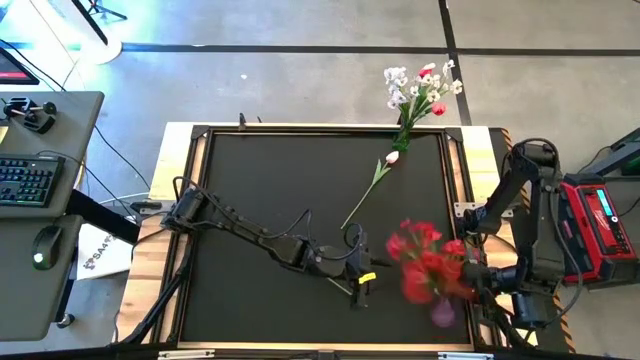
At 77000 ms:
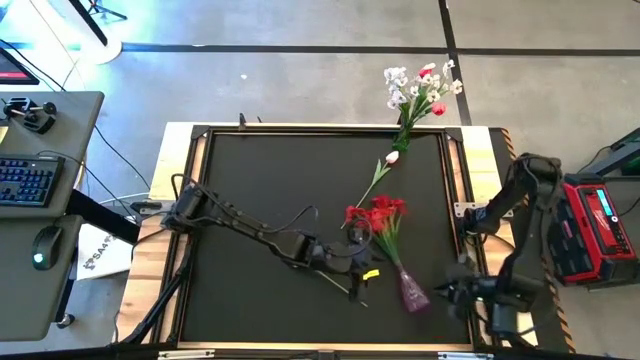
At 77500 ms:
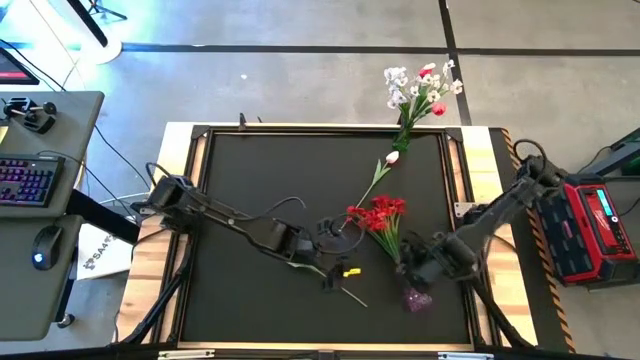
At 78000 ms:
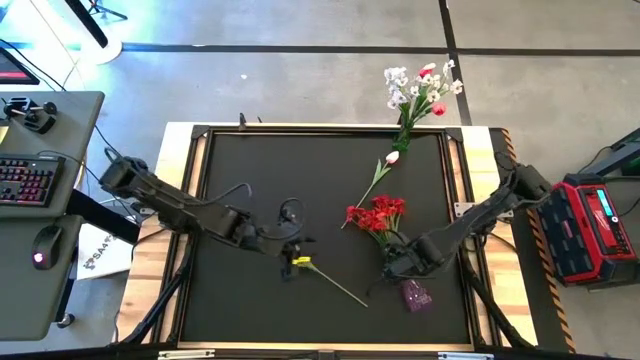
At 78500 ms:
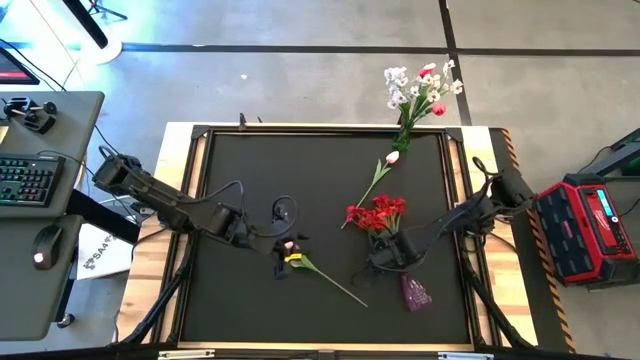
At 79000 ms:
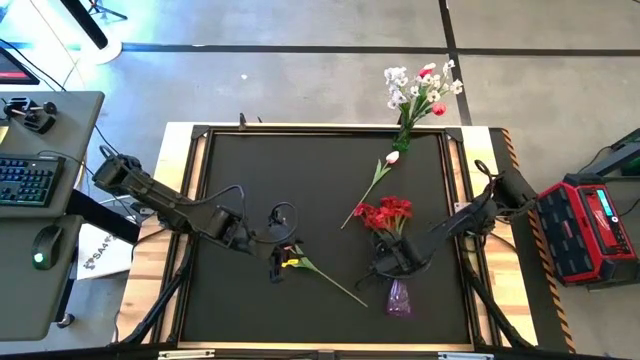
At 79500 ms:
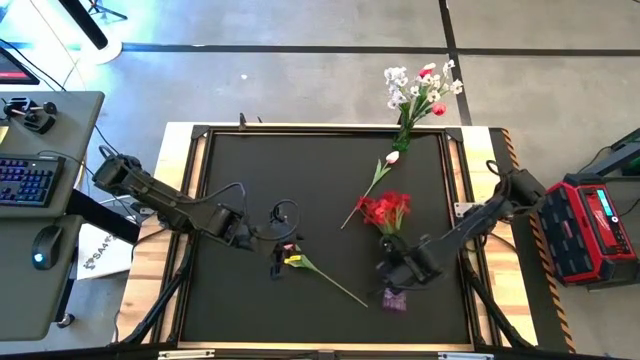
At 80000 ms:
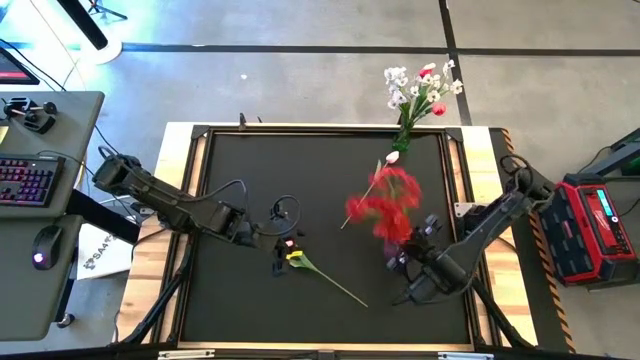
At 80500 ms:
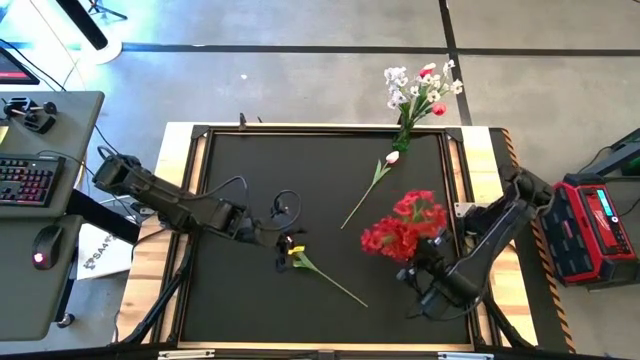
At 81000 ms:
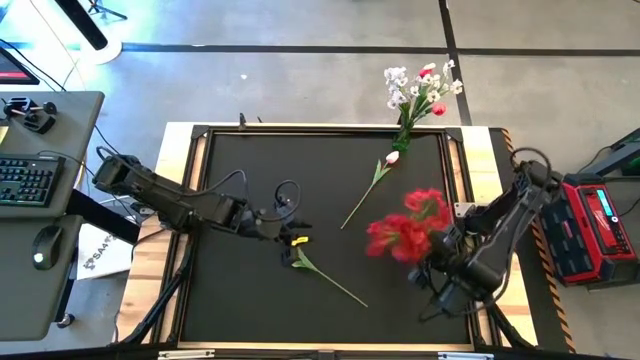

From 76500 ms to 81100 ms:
Task: Sort flowers into vase by color
Adjust the violet vase

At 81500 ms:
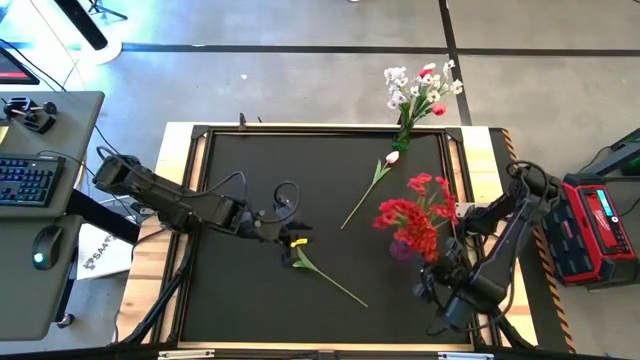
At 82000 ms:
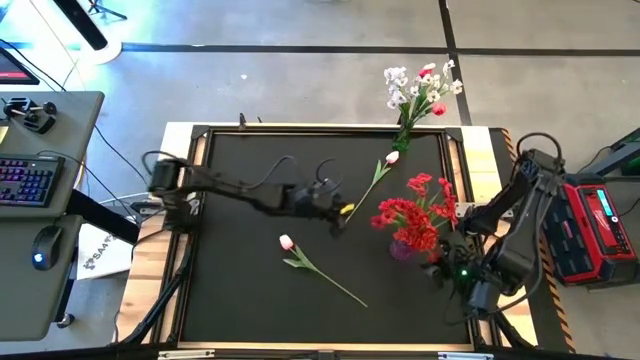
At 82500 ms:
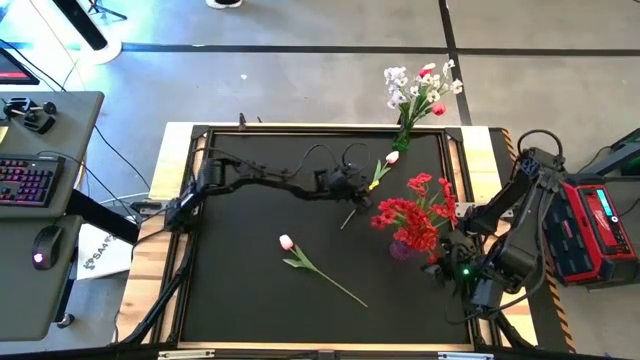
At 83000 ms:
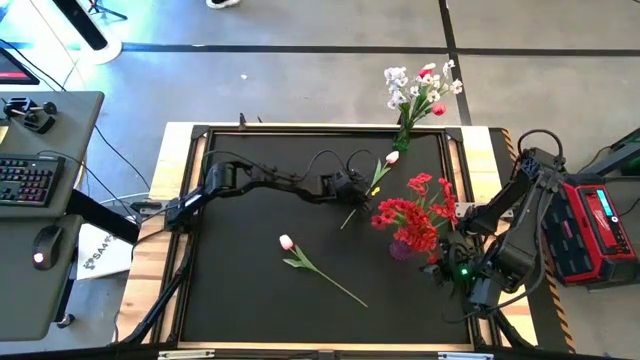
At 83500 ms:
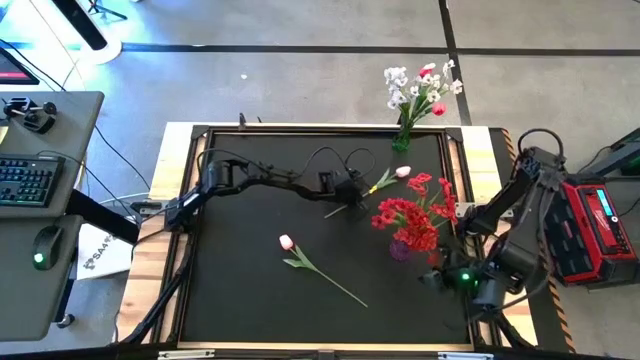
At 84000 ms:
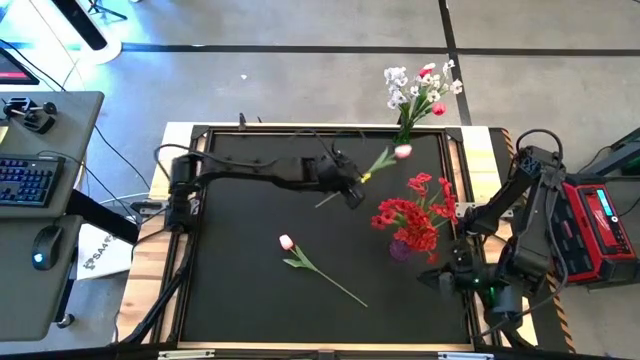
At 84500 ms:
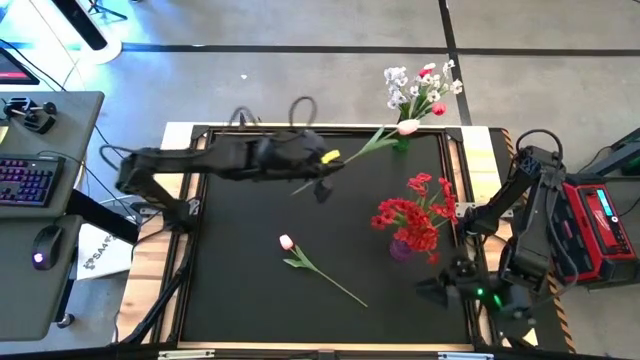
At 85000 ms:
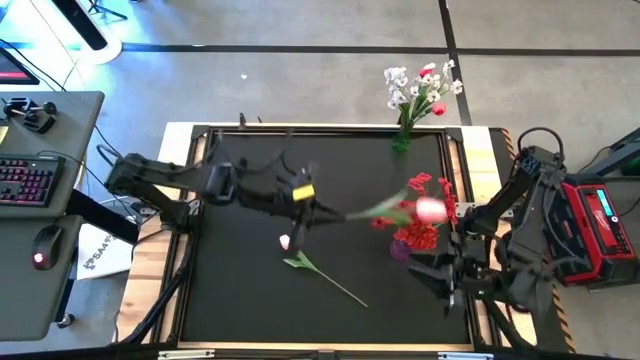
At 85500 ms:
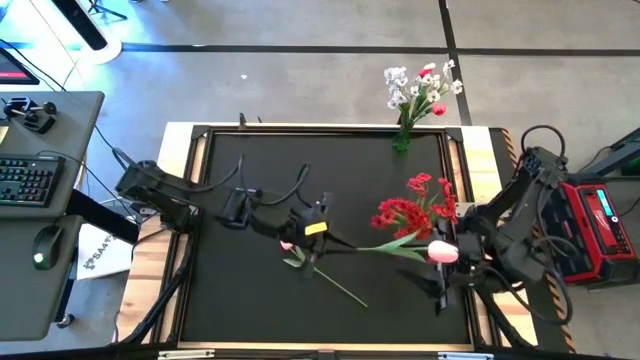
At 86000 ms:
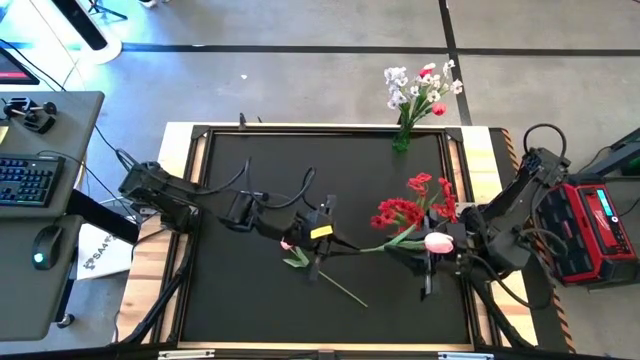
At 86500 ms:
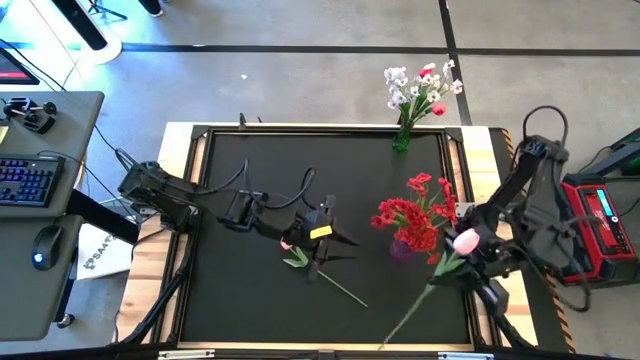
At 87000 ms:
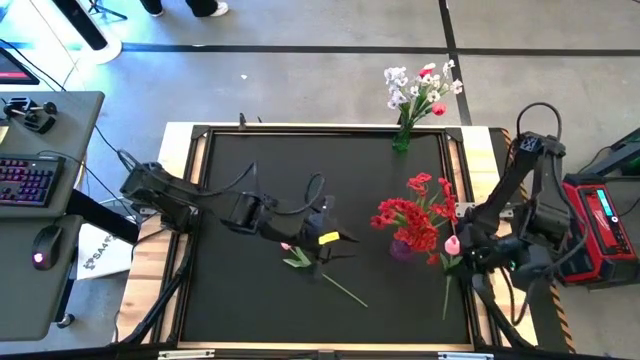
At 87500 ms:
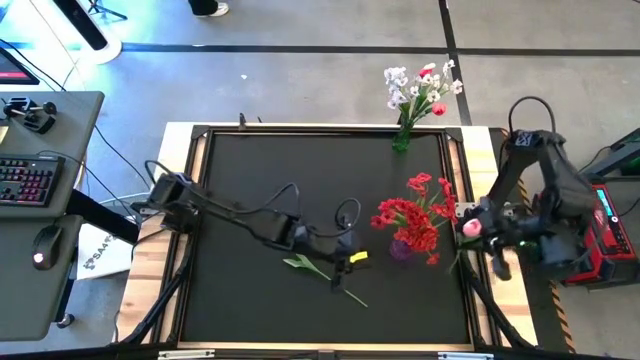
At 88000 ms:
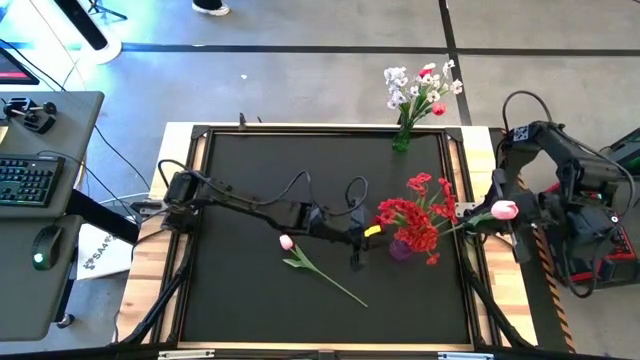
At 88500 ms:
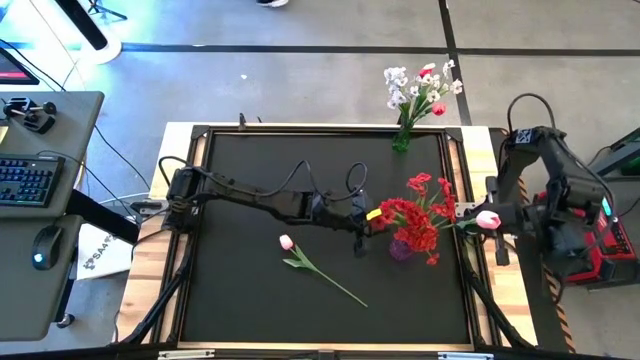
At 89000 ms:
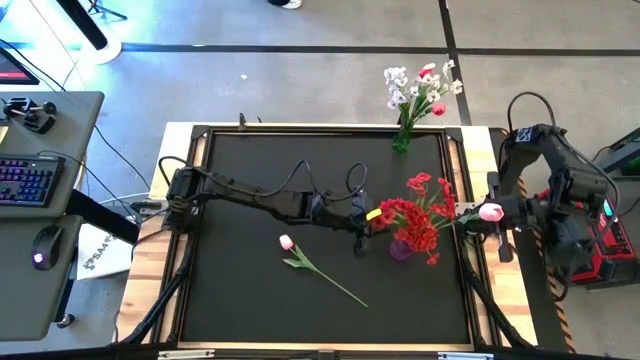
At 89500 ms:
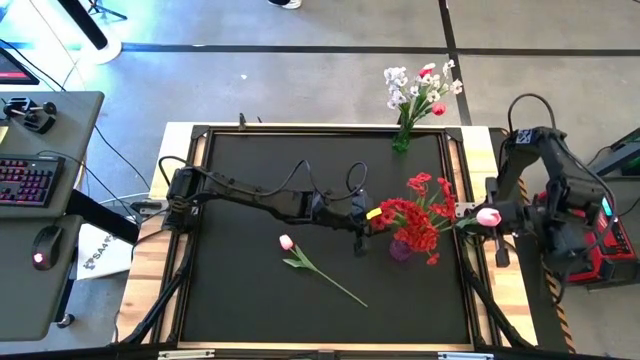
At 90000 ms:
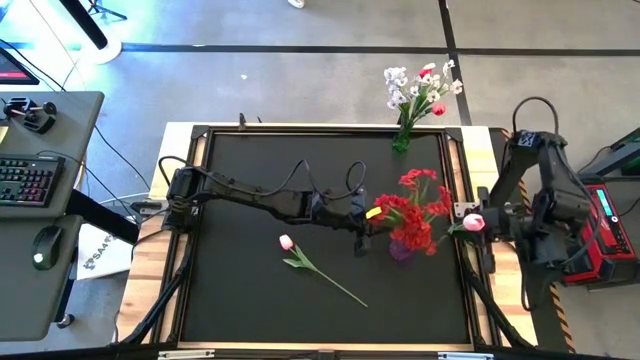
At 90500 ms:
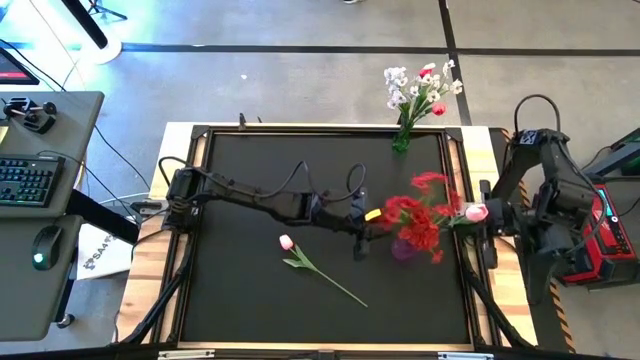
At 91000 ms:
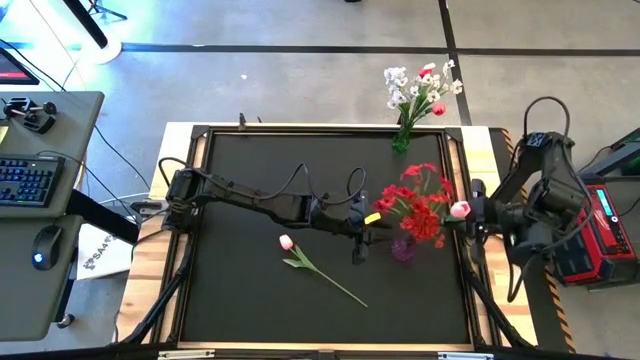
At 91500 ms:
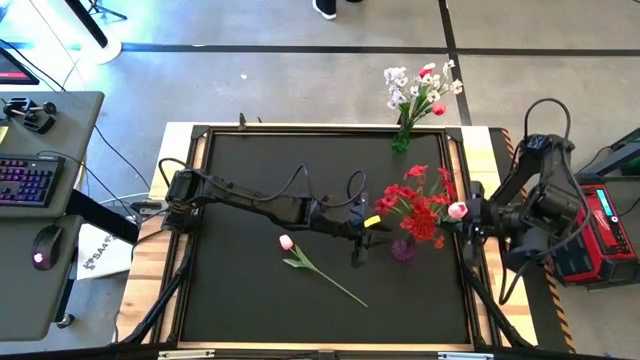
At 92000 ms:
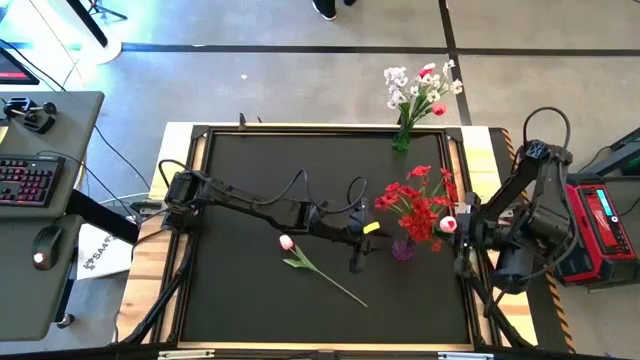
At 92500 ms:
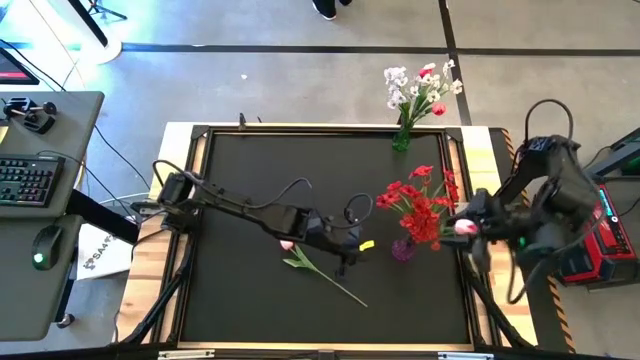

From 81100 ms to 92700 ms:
Put the top pink tulip into the violet vase

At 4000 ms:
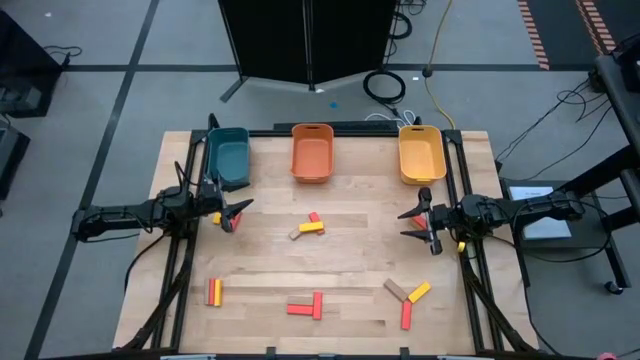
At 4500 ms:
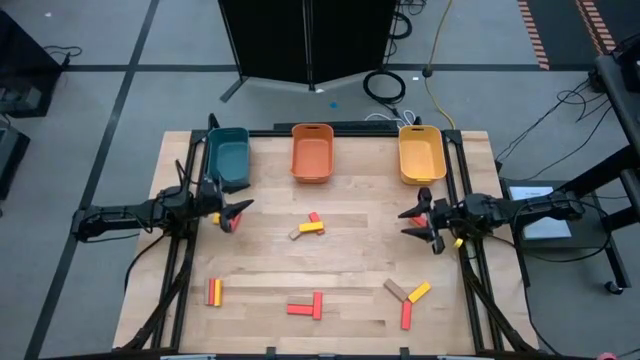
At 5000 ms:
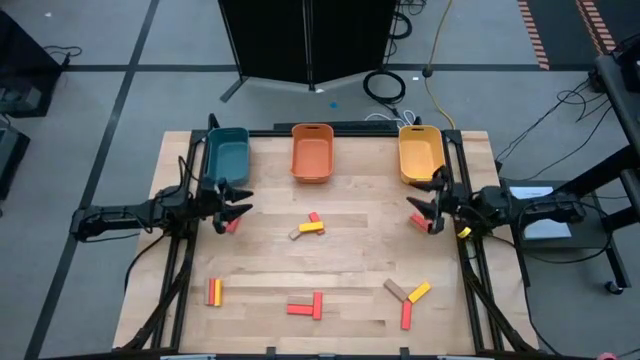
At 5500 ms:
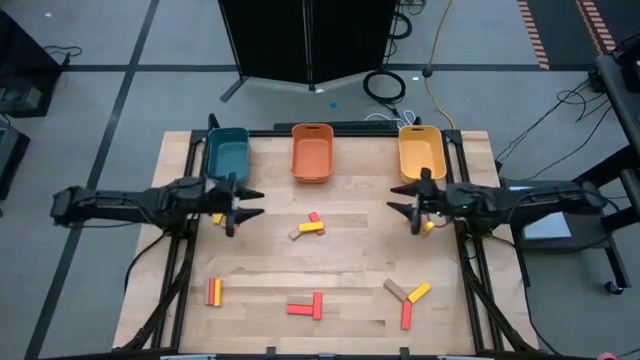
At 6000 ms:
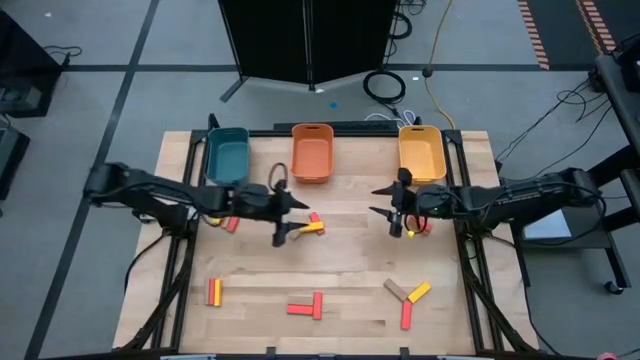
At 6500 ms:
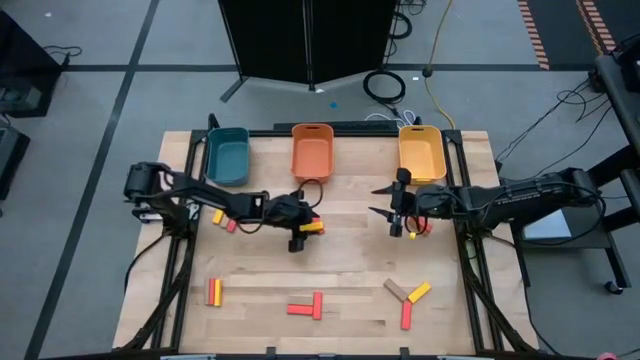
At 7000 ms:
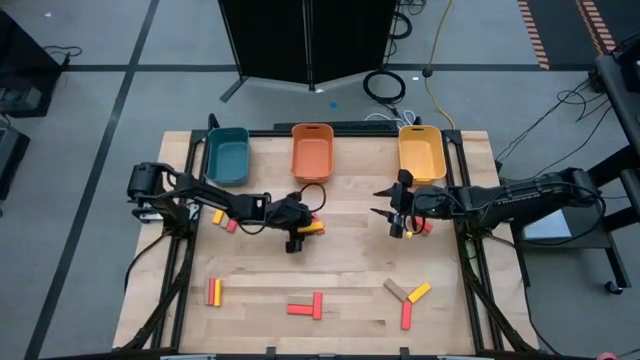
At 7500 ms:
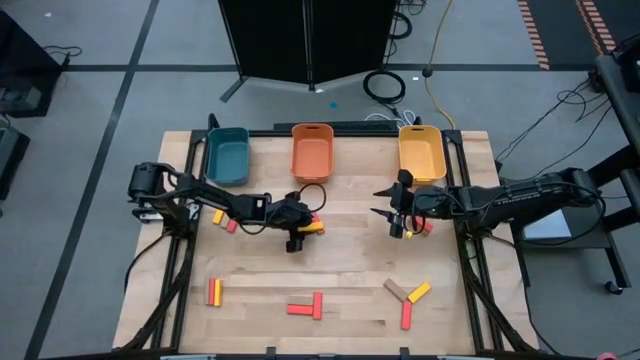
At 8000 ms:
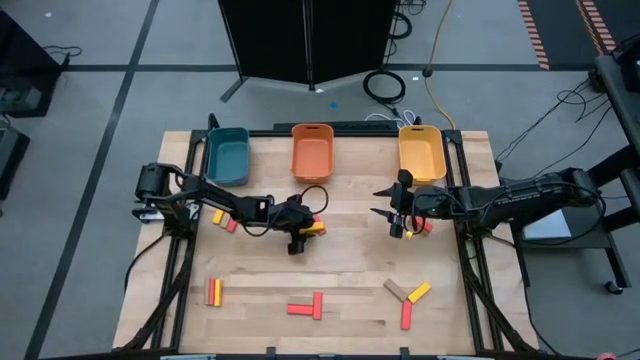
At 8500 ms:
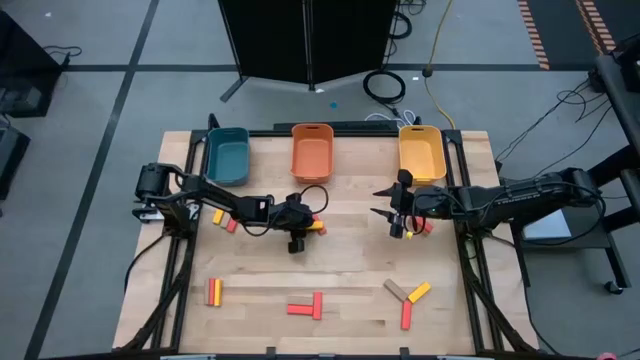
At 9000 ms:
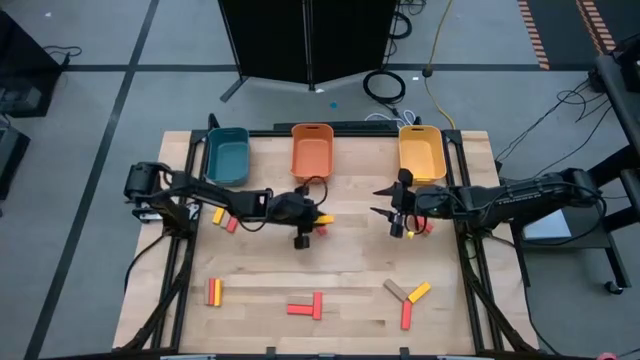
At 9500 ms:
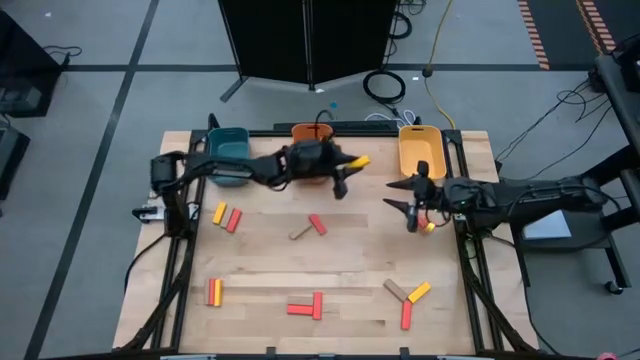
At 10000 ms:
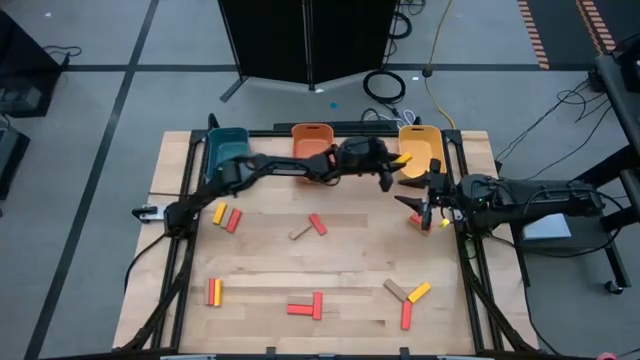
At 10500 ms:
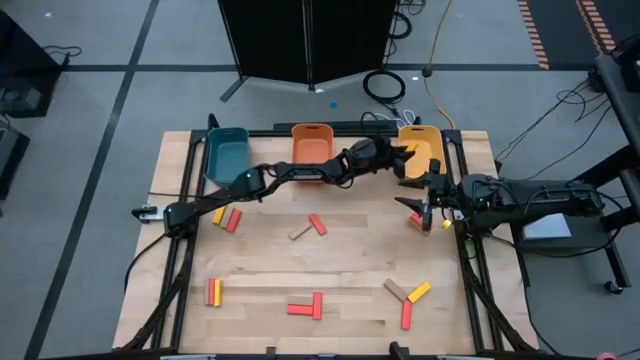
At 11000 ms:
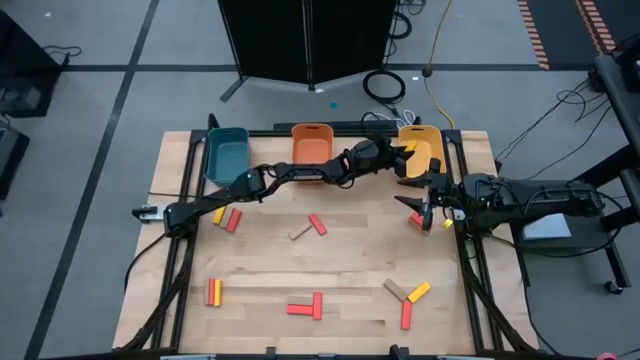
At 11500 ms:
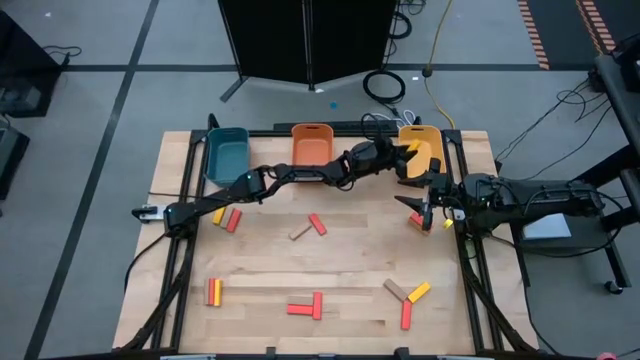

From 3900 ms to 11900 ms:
Task: Sort blocks
Put the yellow block into the yellow bin
